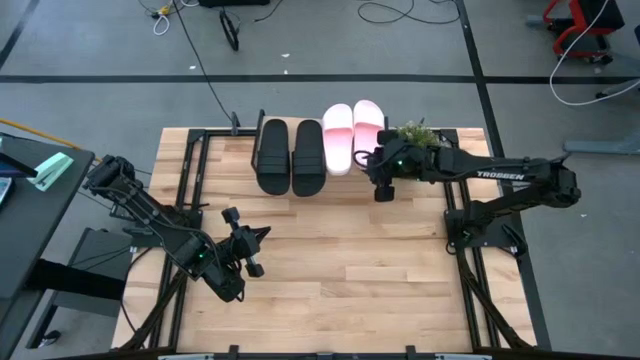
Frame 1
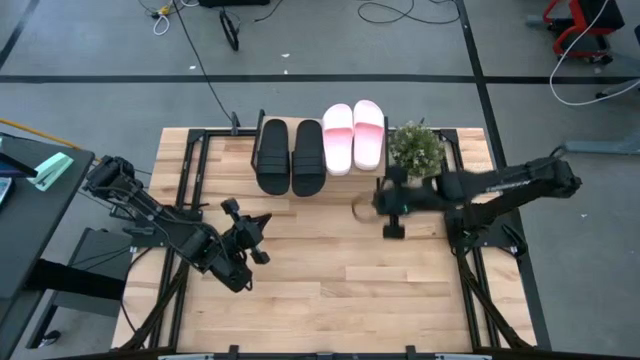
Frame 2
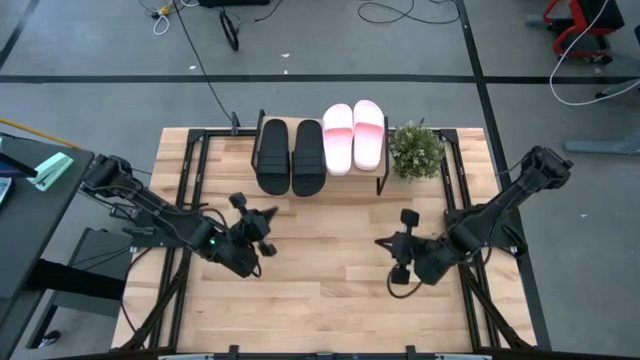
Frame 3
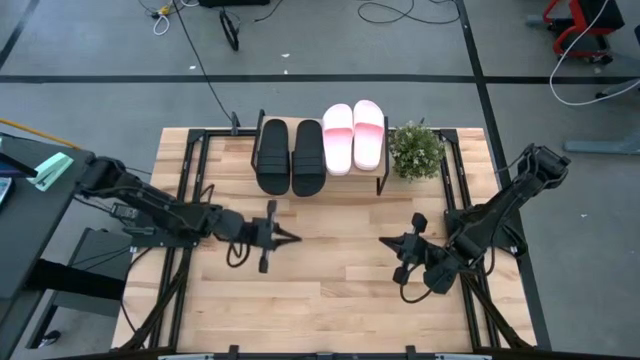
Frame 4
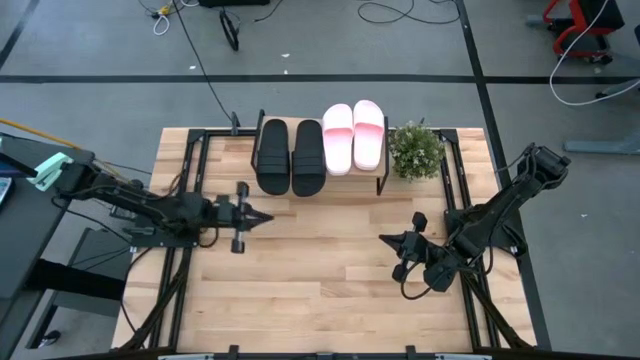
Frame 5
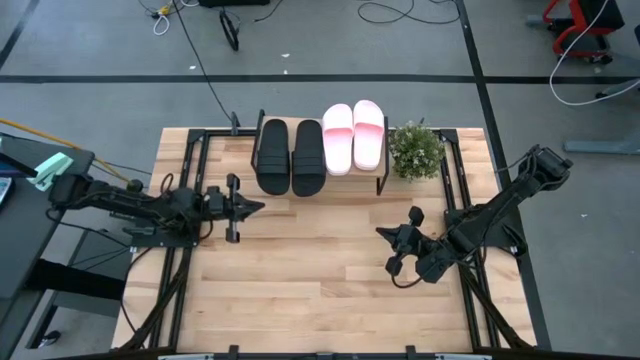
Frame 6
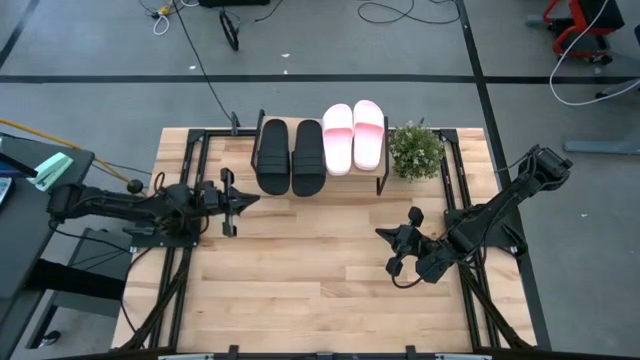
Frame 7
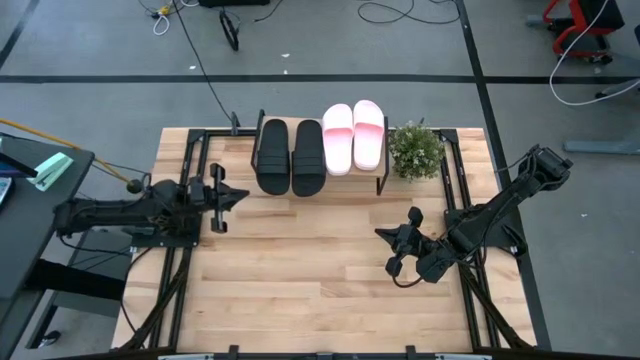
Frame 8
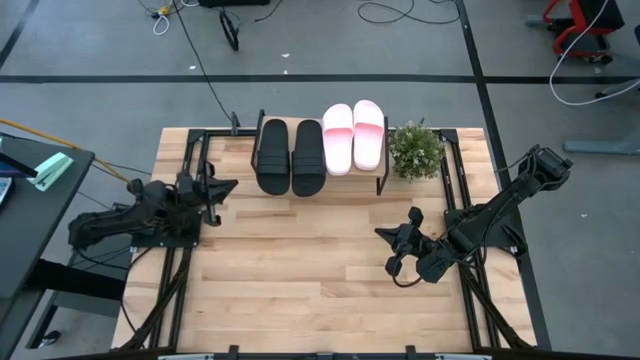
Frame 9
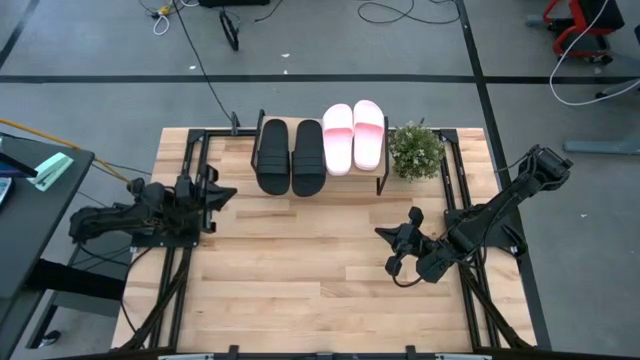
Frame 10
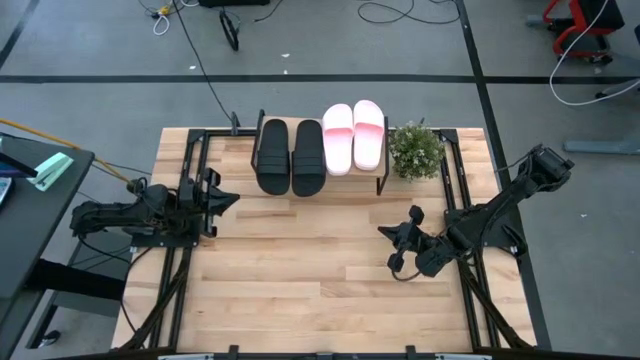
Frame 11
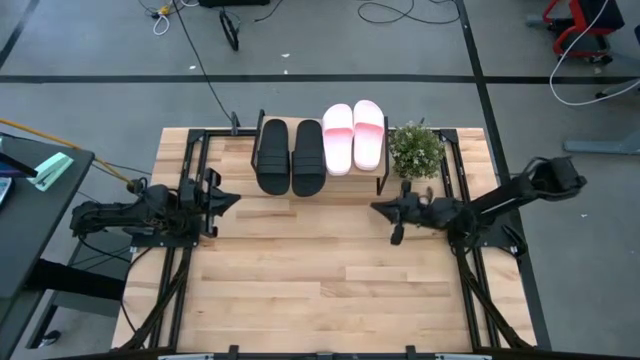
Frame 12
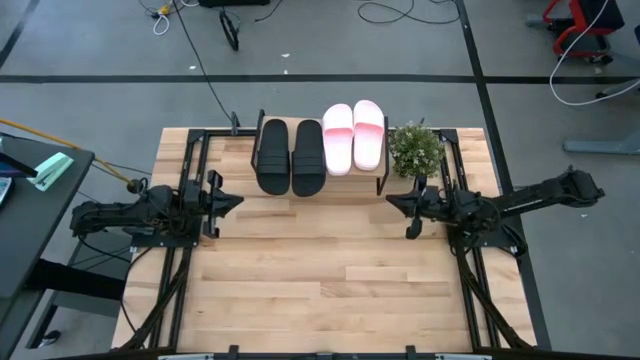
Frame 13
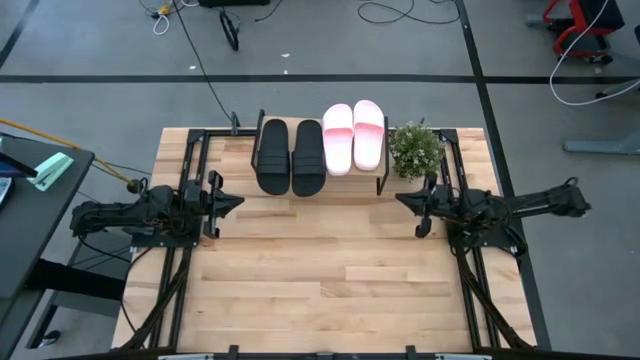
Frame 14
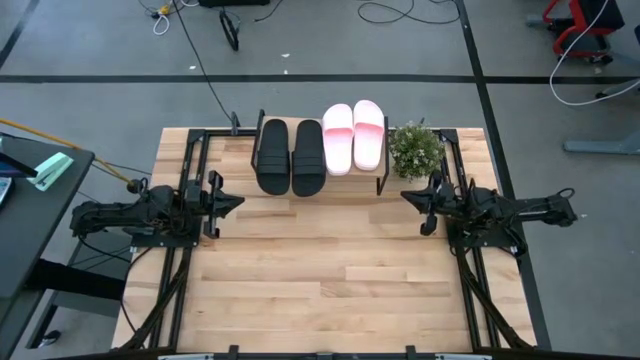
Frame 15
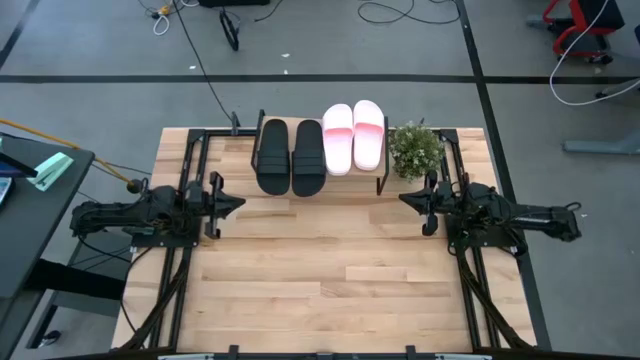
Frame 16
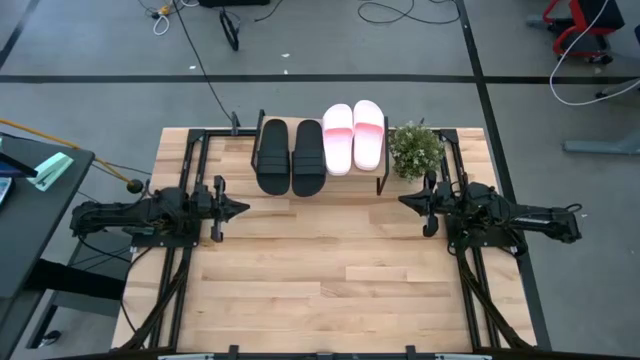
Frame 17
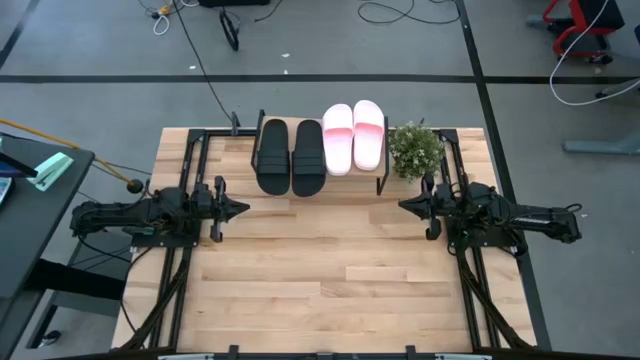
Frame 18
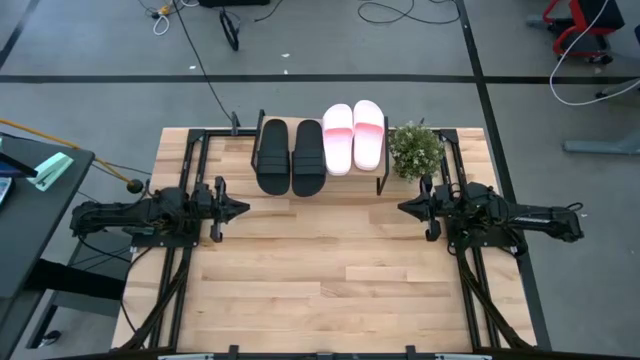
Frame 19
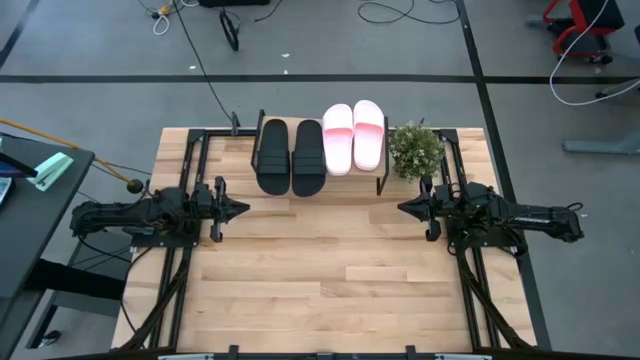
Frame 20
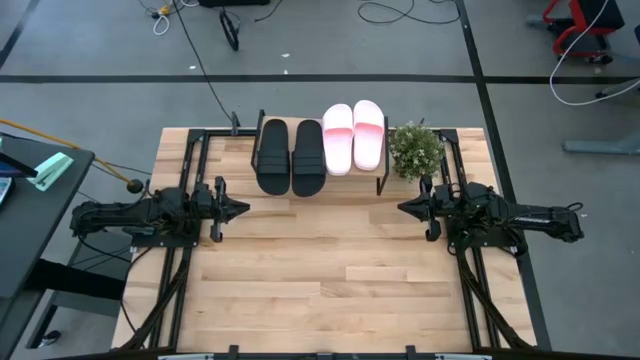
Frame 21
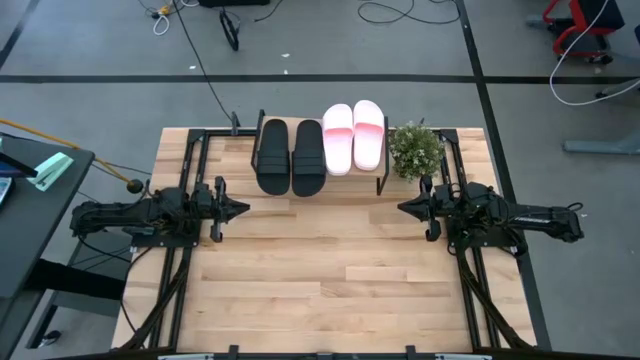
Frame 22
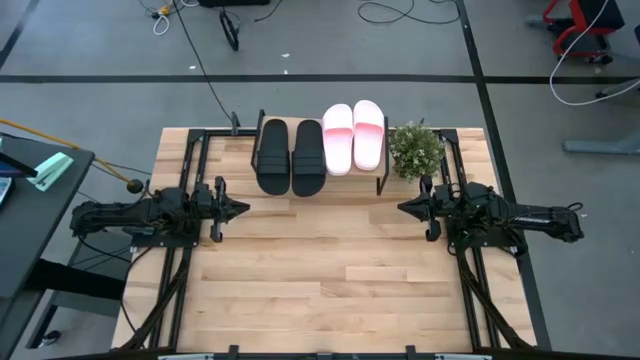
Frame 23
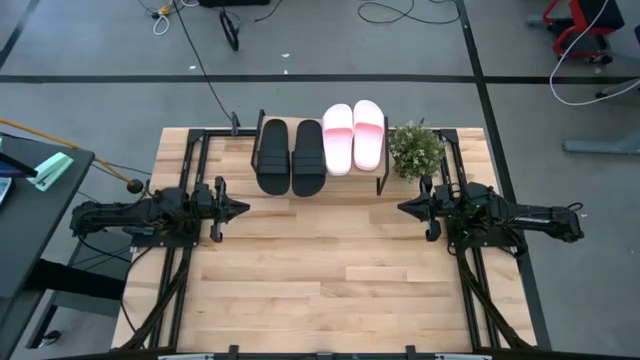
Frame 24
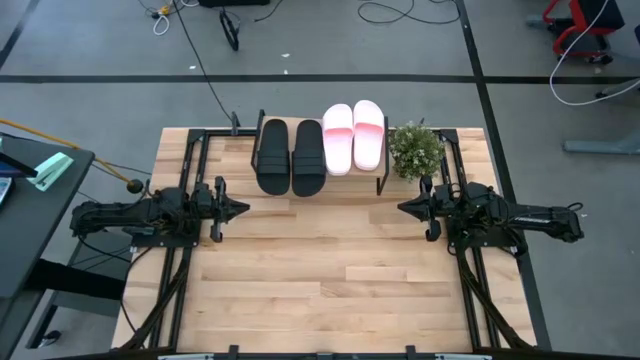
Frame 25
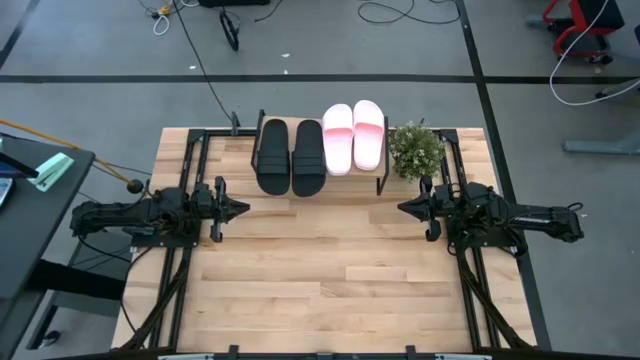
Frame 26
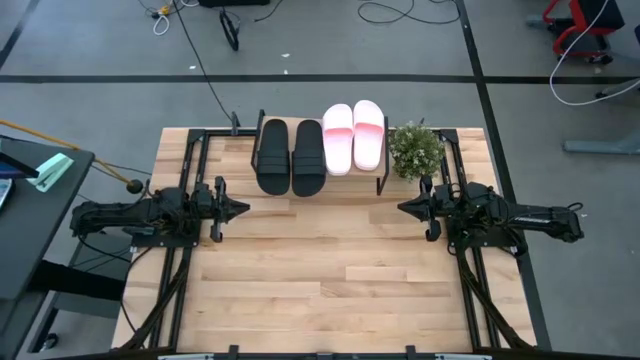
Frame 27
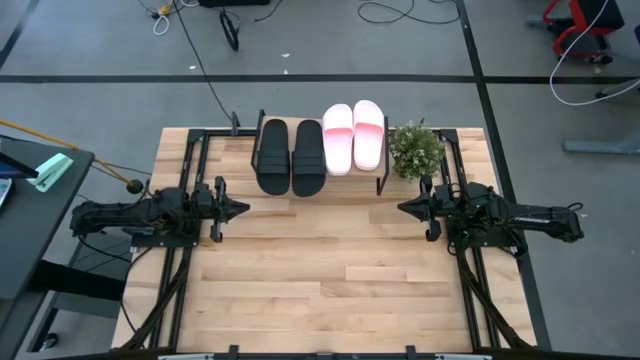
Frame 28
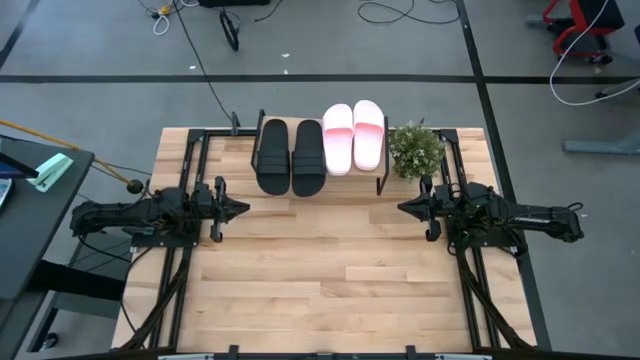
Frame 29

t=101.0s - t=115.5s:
Task: Pick and place slides into the shelf
Return to Home Position

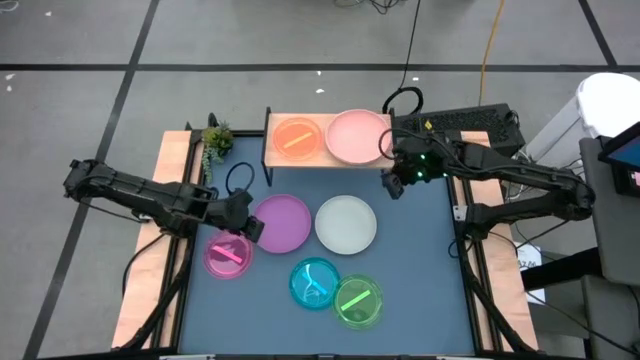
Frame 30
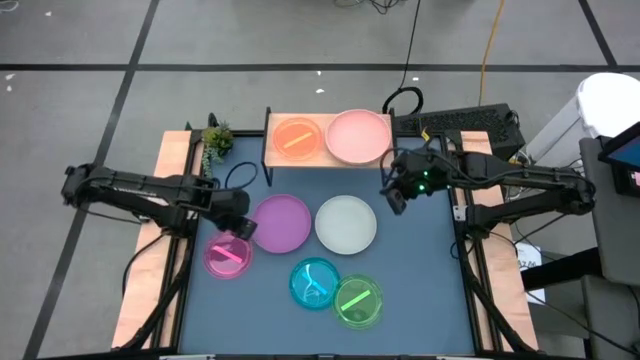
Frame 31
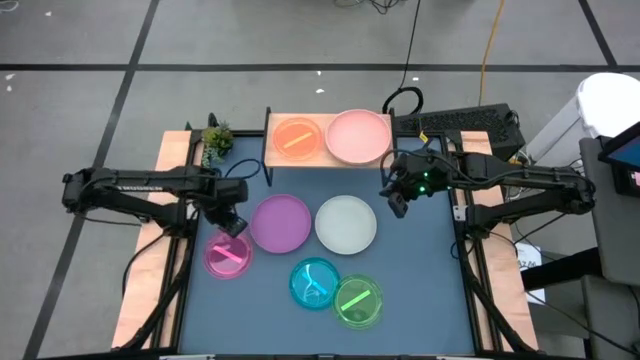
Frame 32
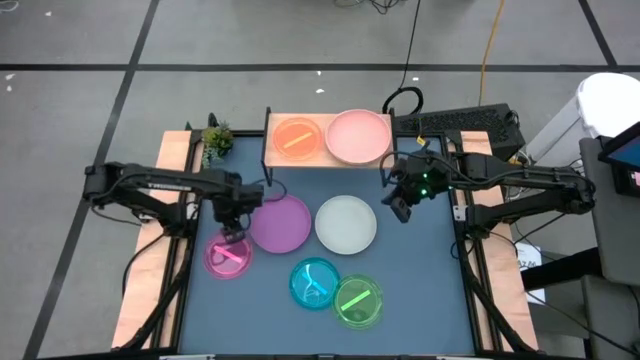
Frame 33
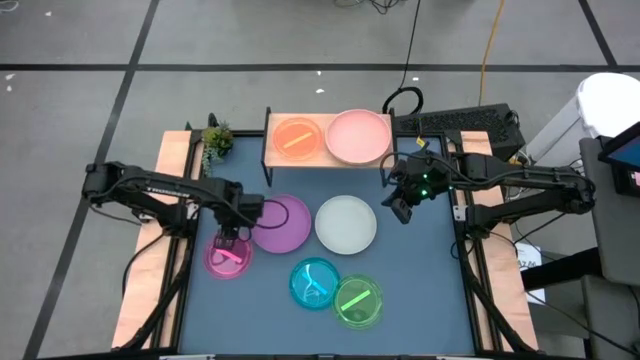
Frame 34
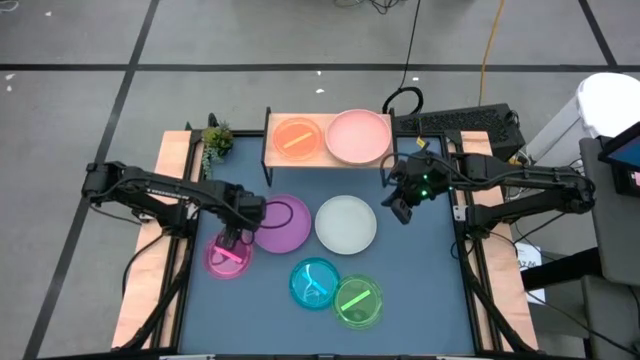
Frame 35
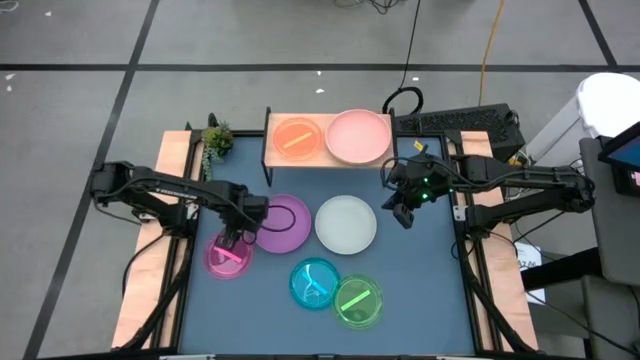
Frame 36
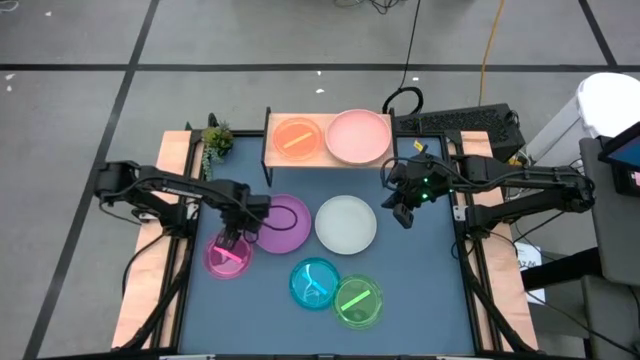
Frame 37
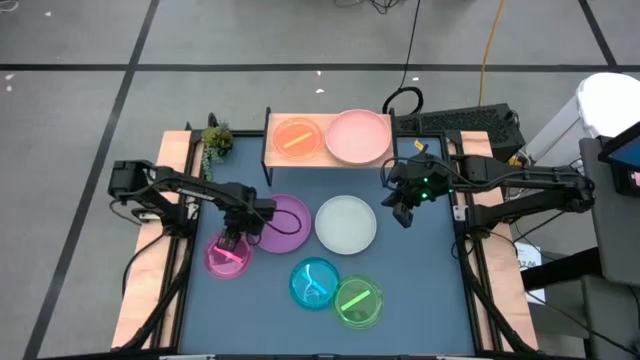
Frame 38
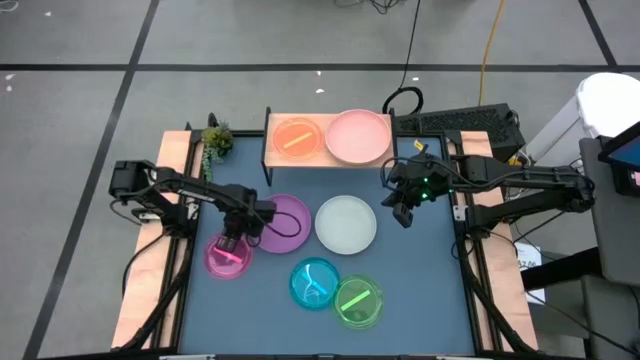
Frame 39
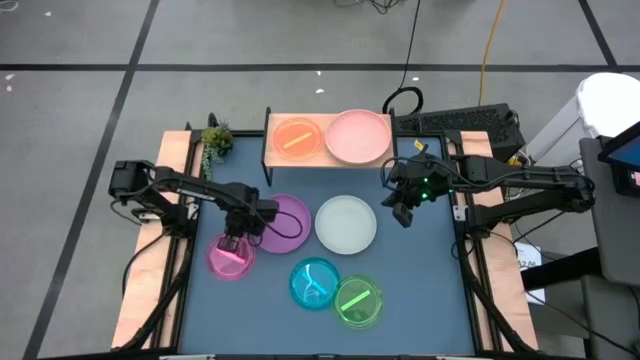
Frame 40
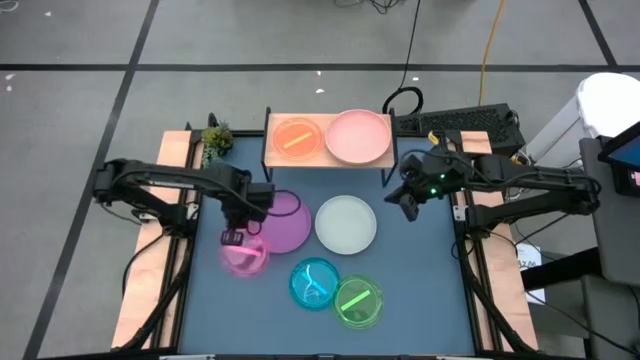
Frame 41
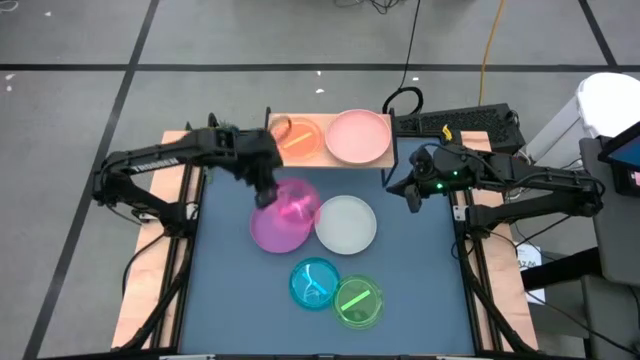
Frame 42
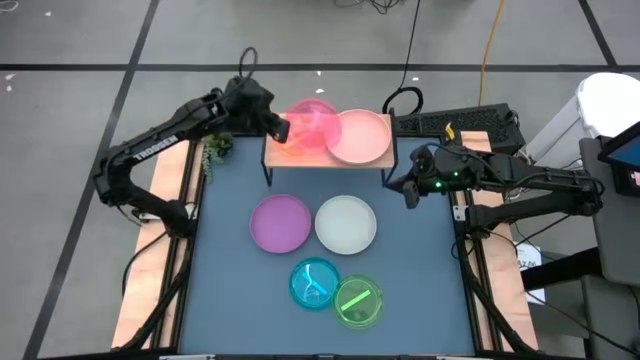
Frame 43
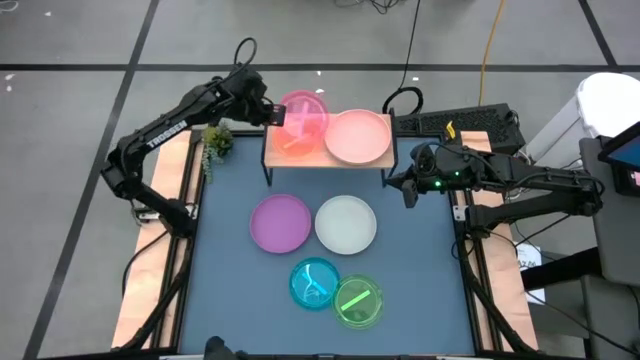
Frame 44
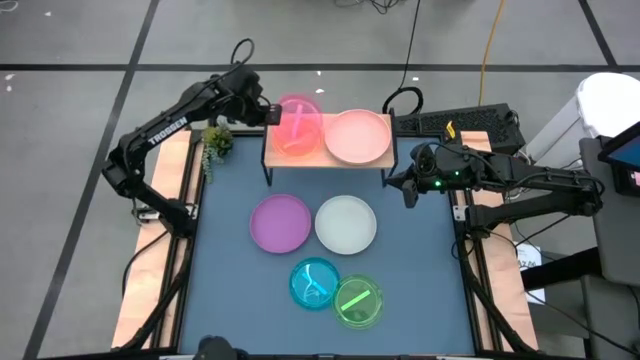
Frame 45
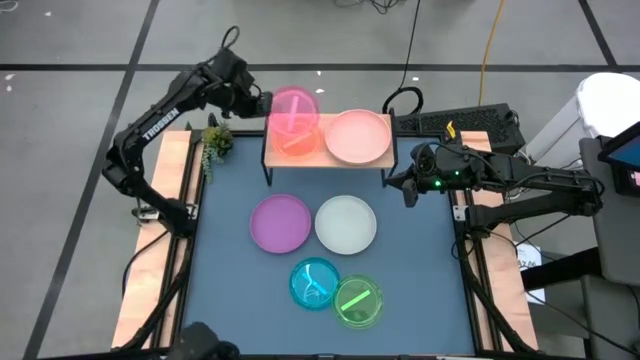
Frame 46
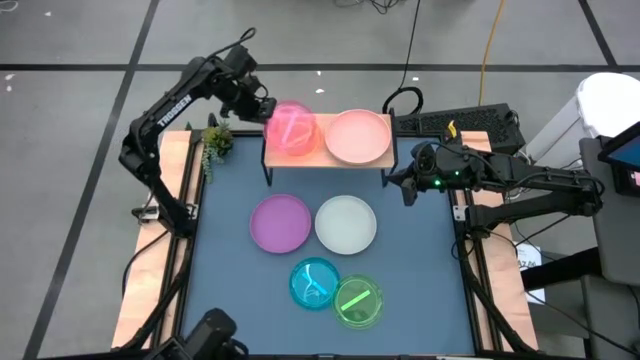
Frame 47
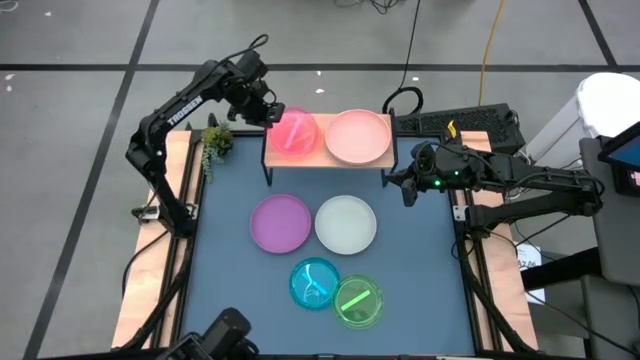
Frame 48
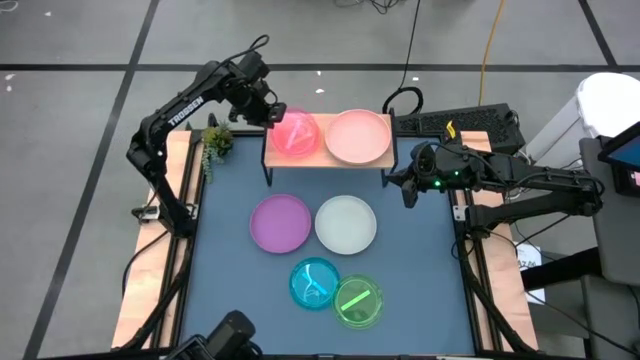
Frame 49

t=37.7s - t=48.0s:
Task: Place and stack plates onto a shelf
Stack the pink plate on top of the orange plate on the shelf
